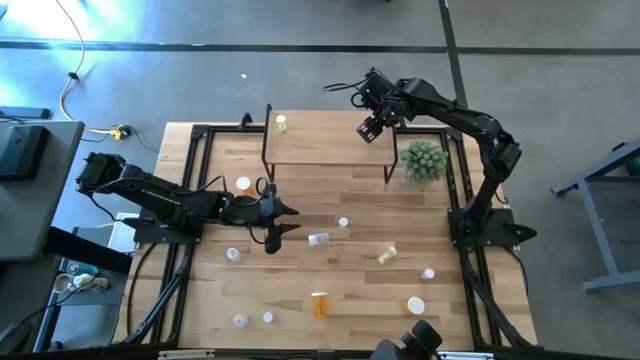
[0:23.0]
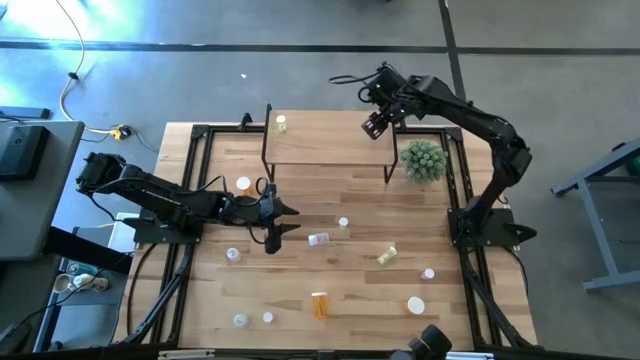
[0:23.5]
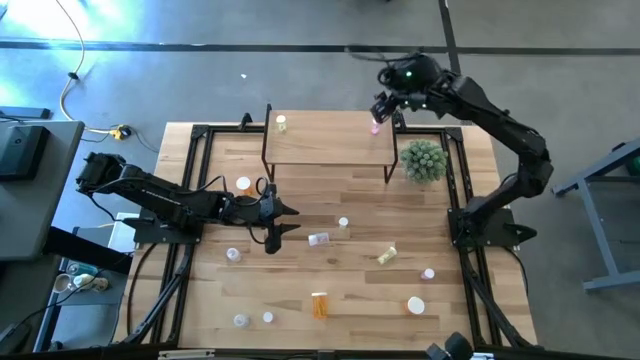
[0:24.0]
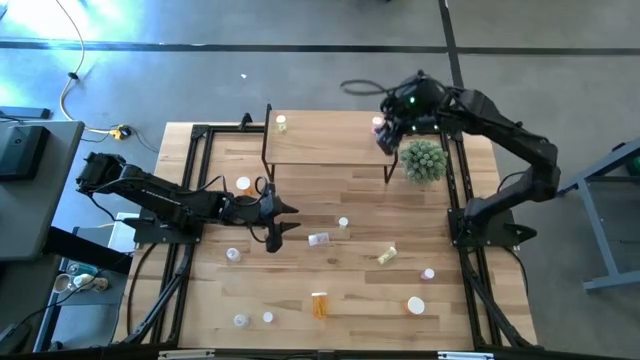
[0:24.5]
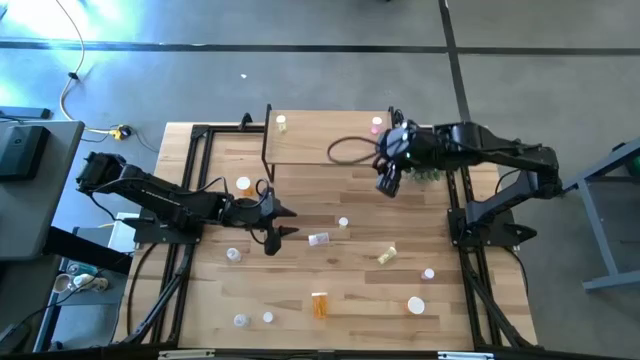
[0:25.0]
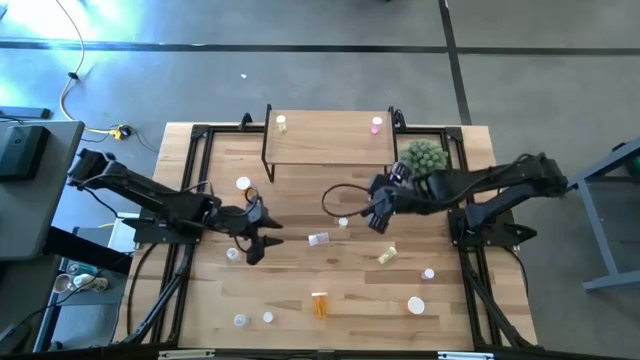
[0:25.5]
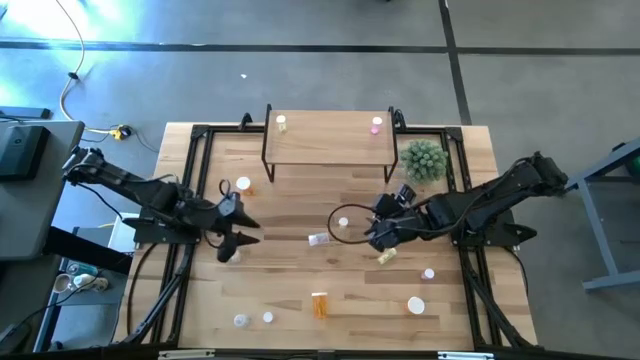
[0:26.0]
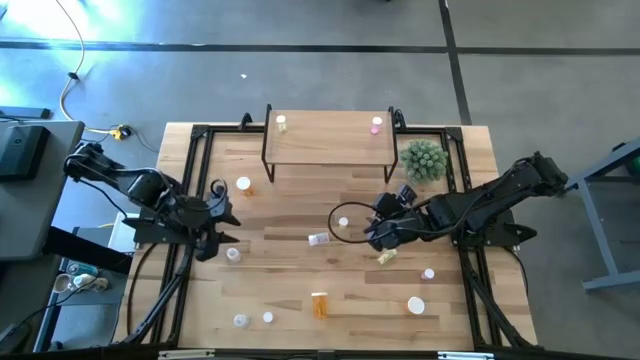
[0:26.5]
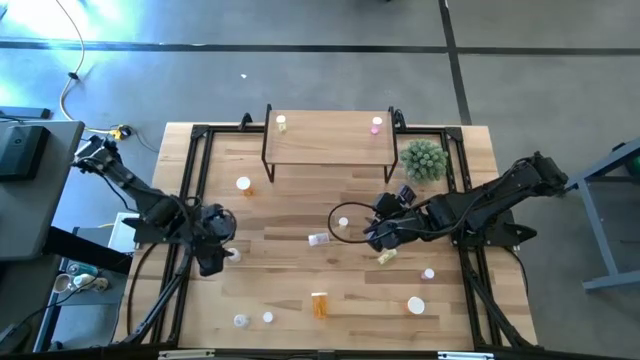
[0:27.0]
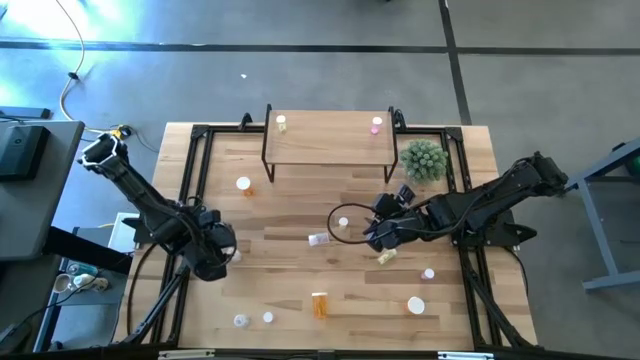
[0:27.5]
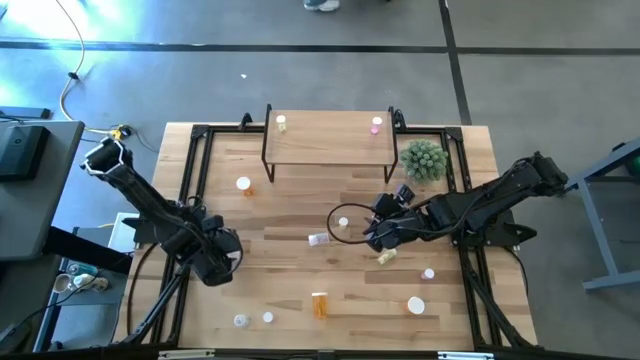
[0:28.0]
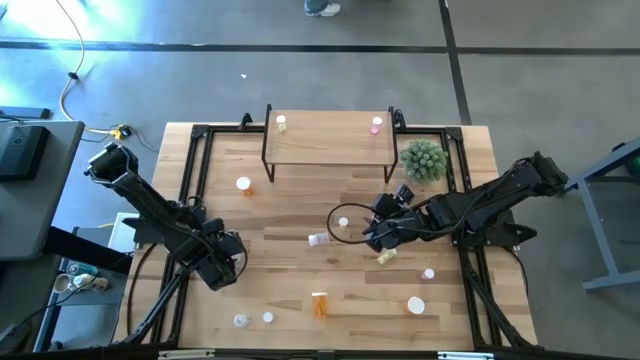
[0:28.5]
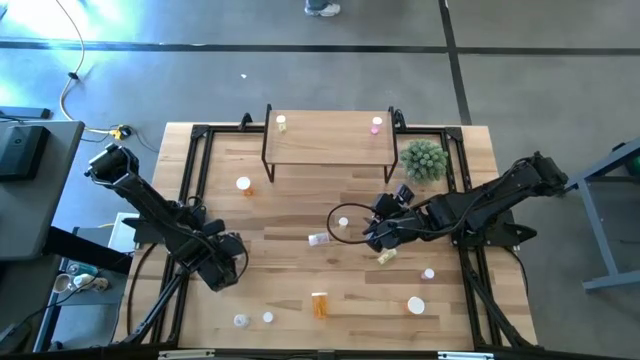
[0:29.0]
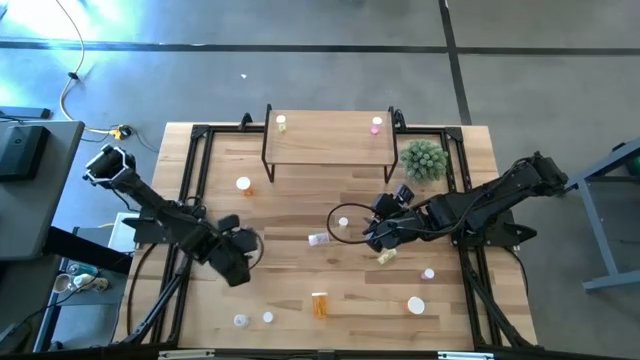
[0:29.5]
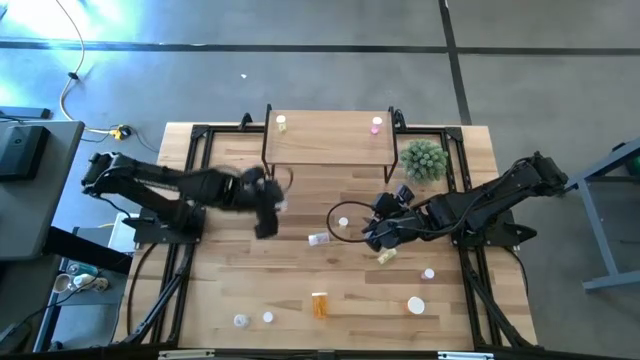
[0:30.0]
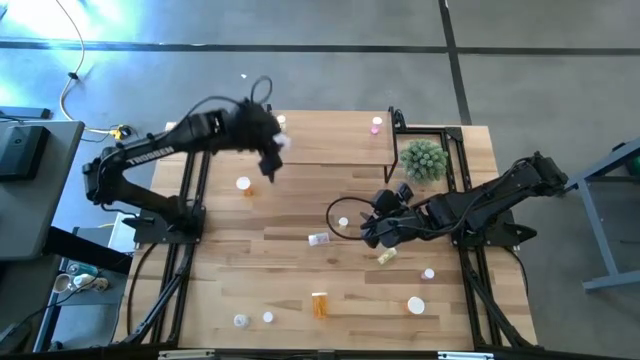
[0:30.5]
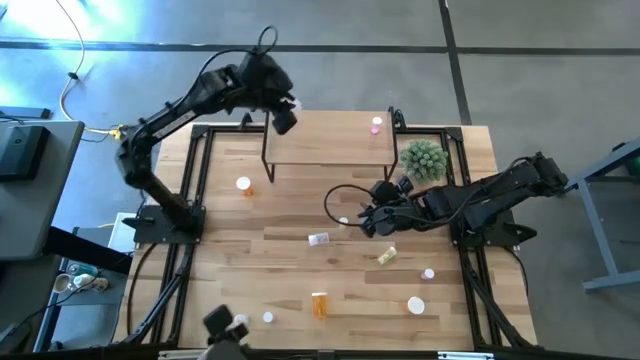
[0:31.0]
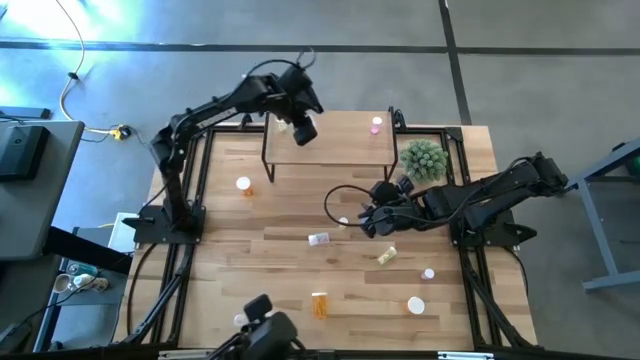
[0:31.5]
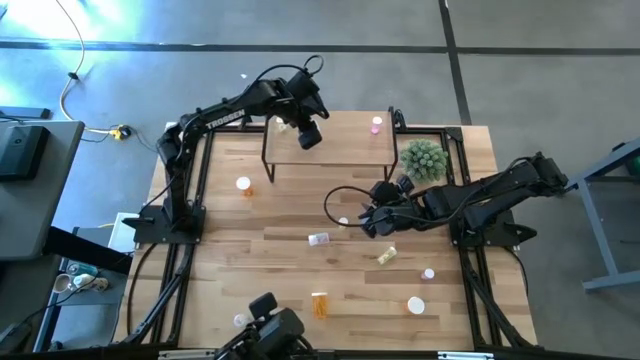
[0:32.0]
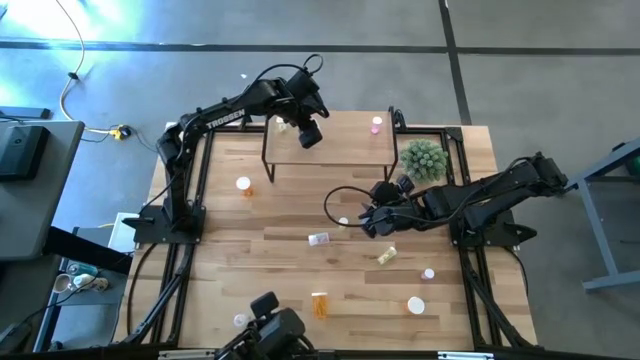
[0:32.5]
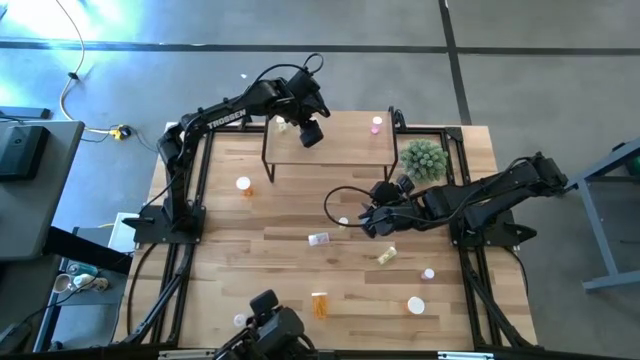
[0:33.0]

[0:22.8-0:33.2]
Task: Pick and place medicine bottles onto shelf by color
Put the left transparent pill bottle on the shelf

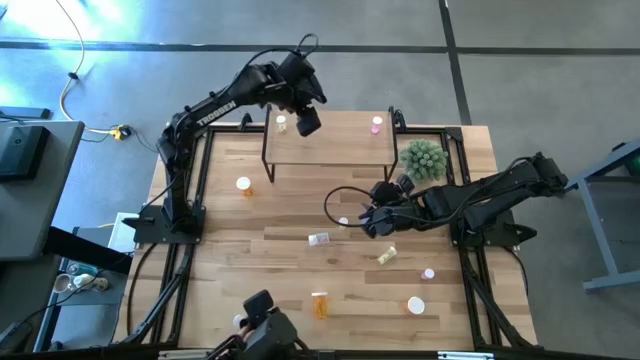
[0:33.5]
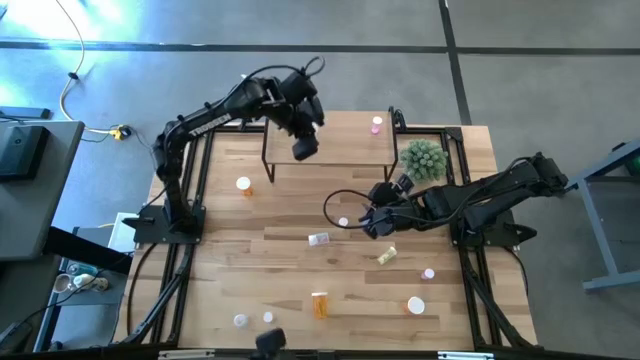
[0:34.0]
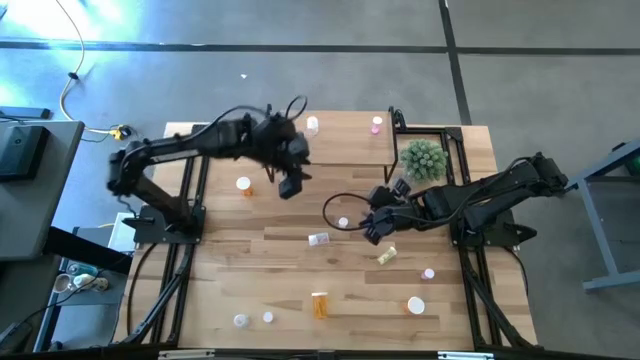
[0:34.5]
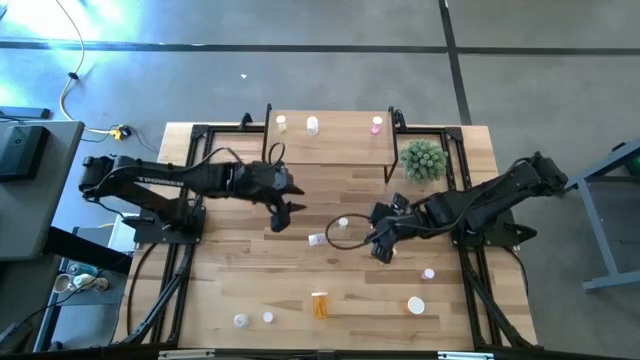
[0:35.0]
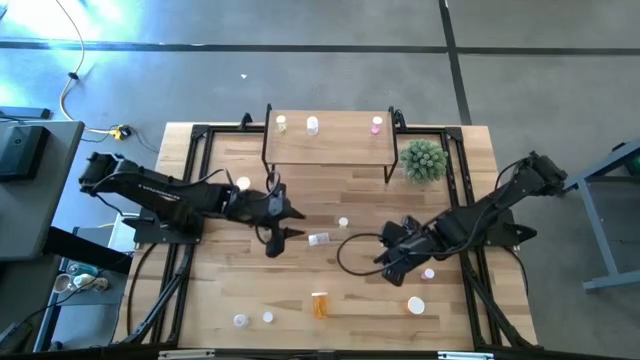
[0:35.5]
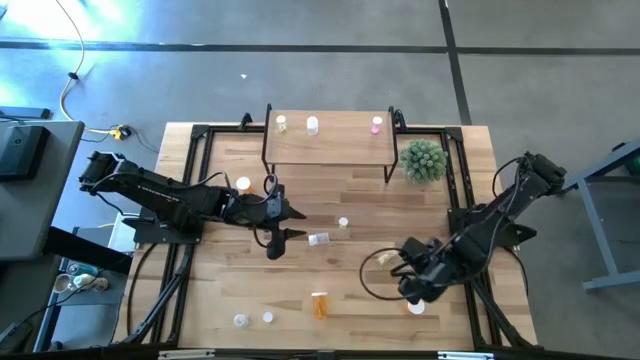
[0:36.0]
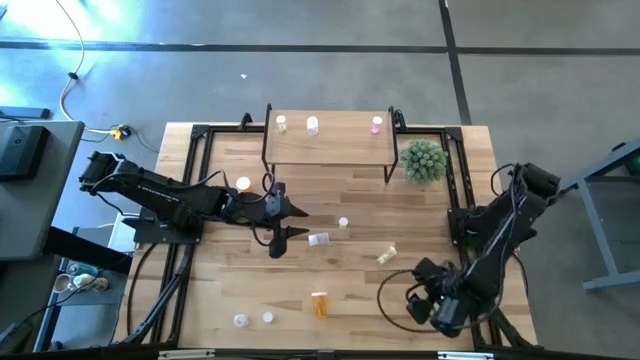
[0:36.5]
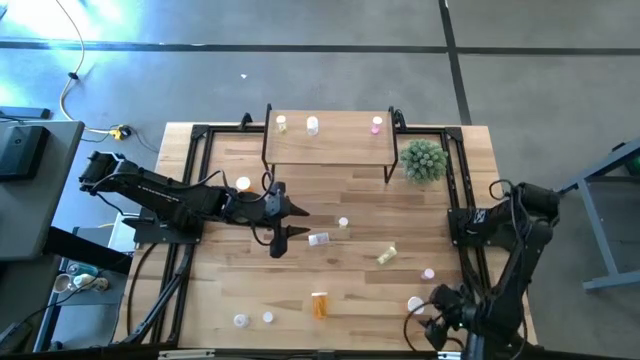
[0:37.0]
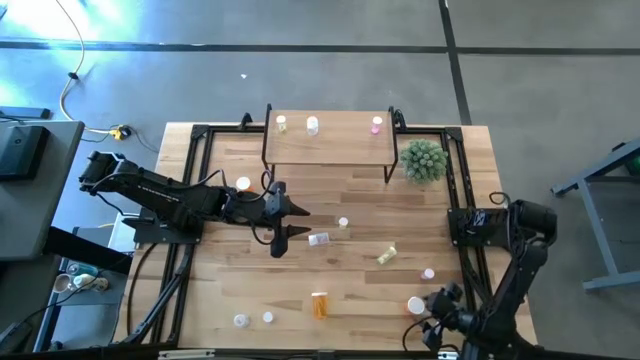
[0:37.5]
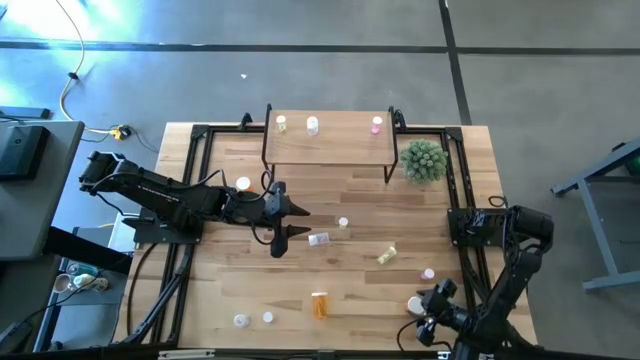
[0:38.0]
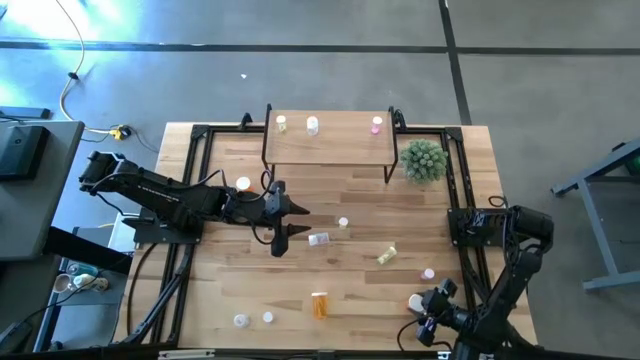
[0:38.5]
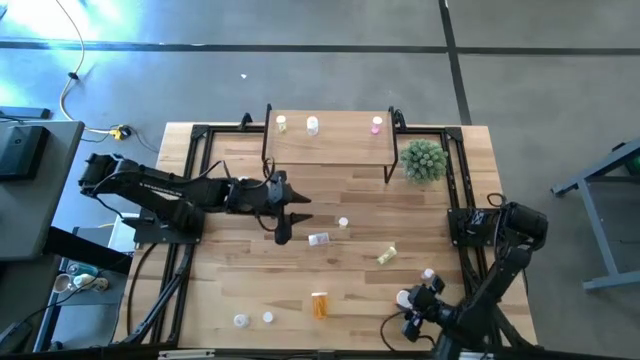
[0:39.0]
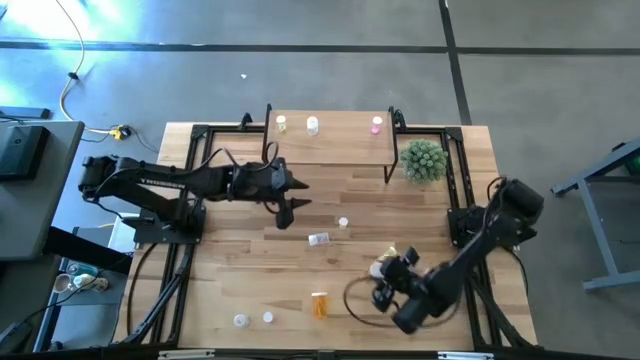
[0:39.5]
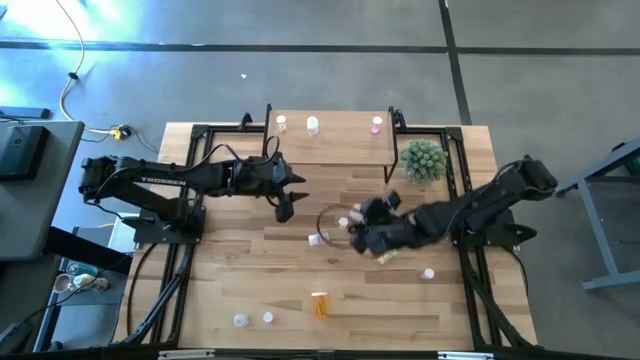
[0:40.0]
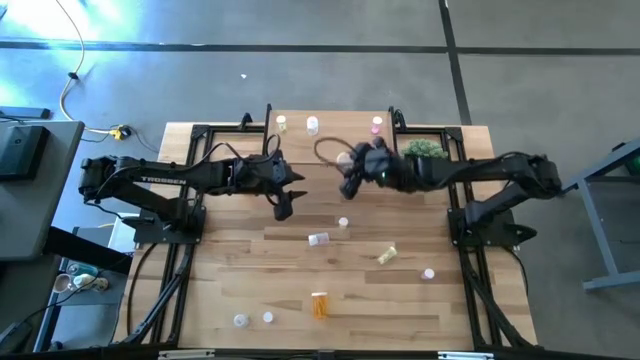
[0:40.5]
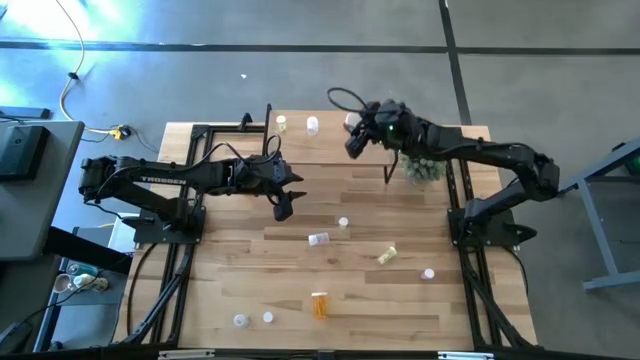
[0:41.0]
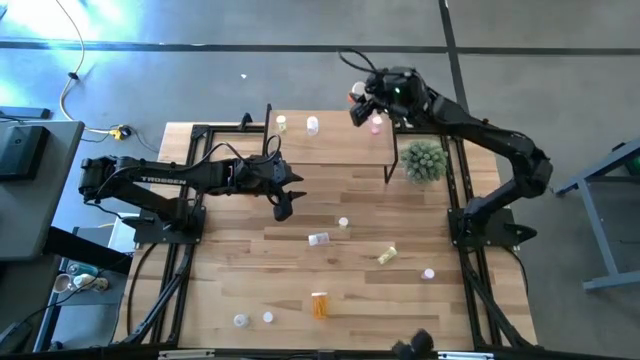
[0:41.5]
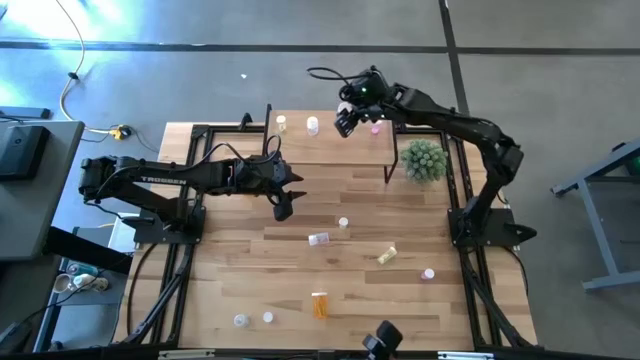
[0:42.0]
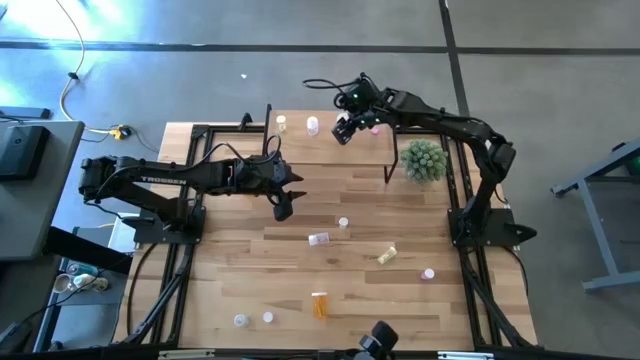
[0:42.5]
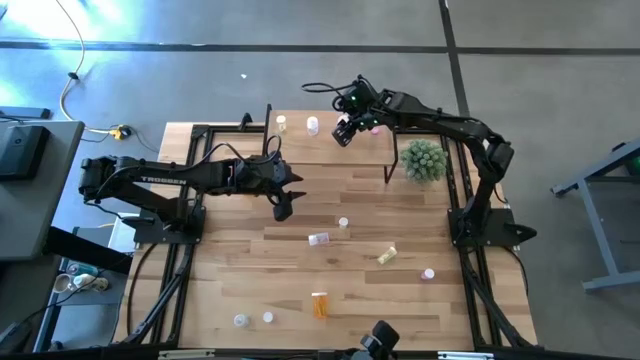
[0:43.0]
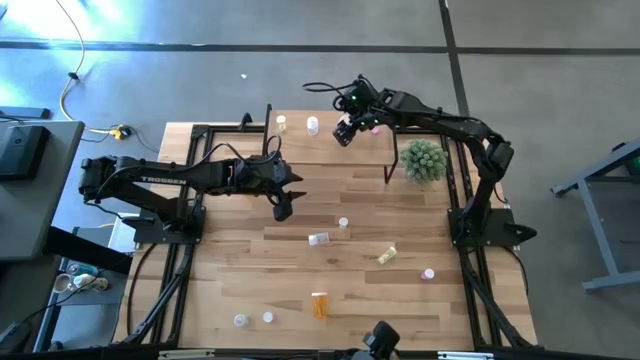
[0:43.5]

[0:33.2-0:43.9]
Put the bottom right orange pill bottle on the shelf

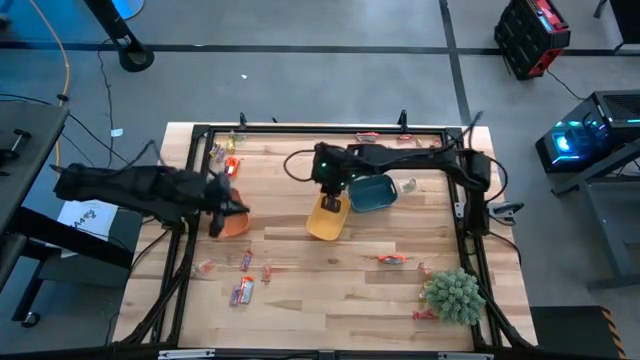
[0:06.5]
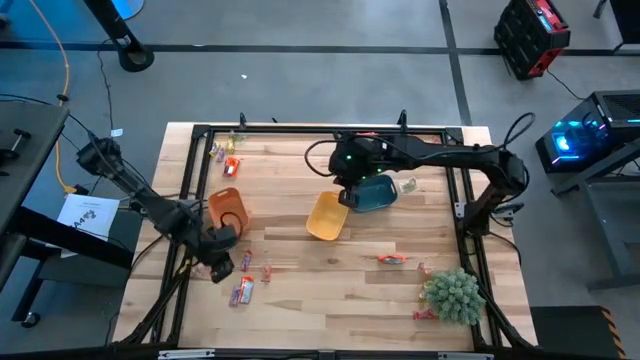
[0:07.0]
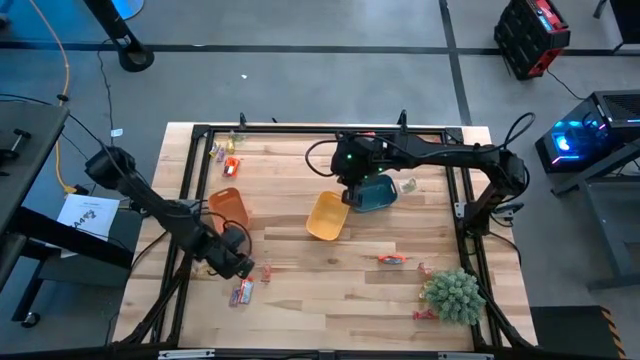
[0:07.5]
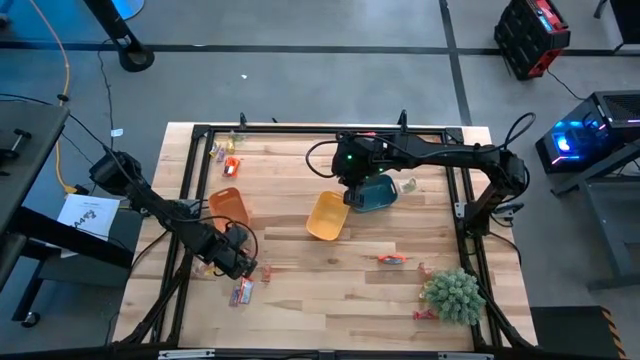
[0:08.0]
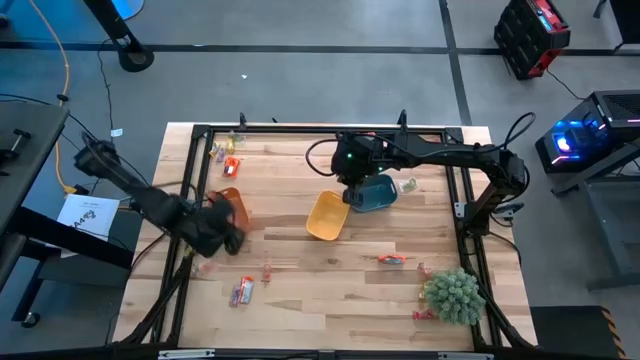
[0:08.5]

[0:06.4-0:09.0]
Task: Sort candy
Put the red candy into the orange bin
